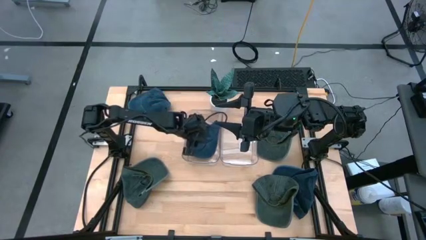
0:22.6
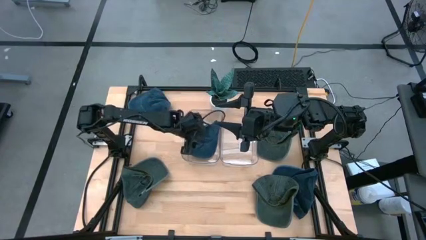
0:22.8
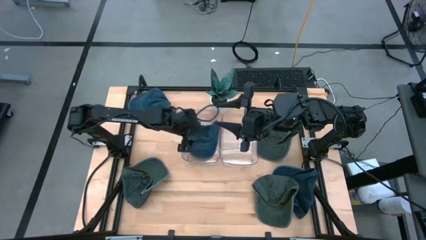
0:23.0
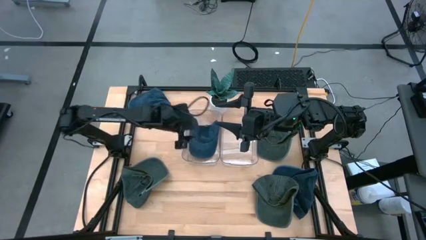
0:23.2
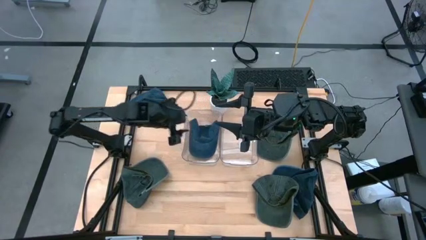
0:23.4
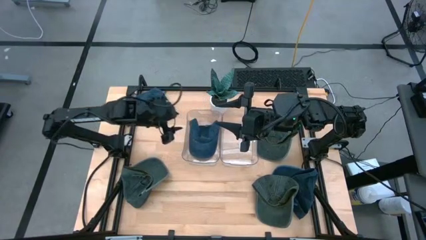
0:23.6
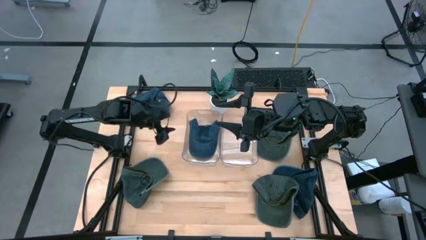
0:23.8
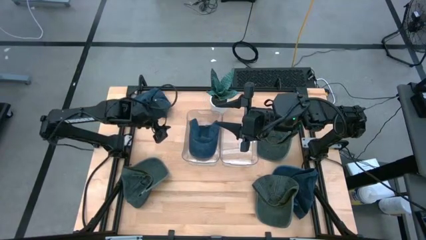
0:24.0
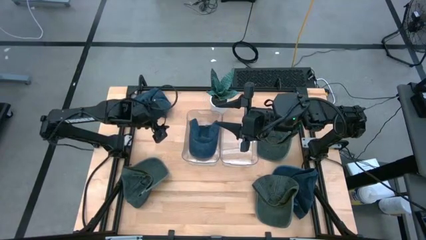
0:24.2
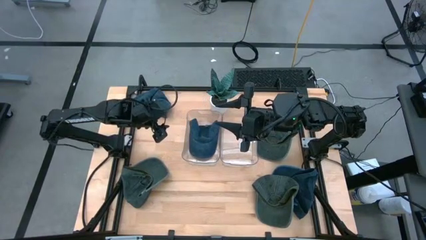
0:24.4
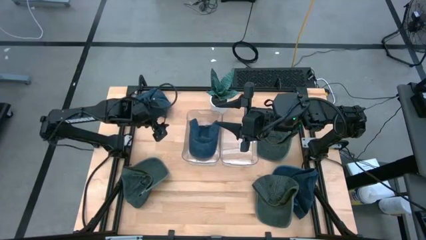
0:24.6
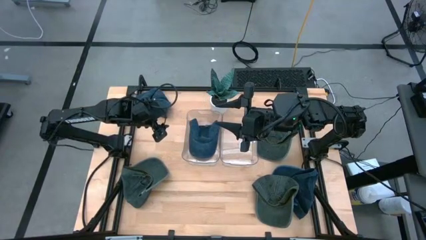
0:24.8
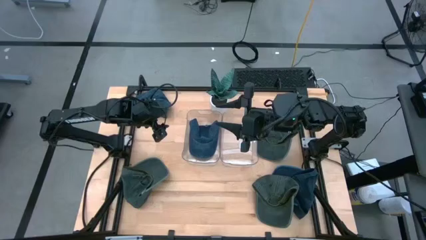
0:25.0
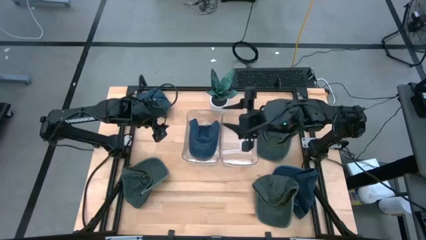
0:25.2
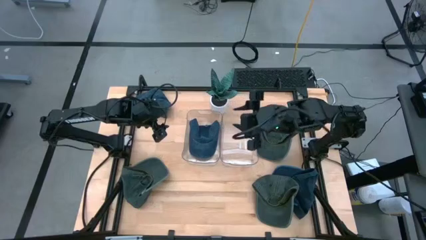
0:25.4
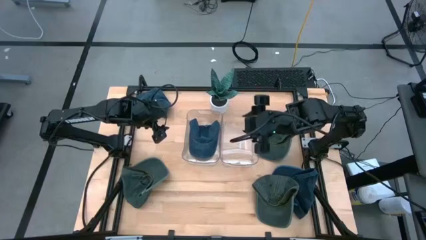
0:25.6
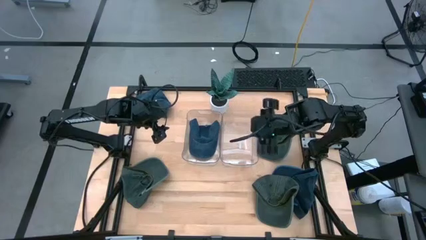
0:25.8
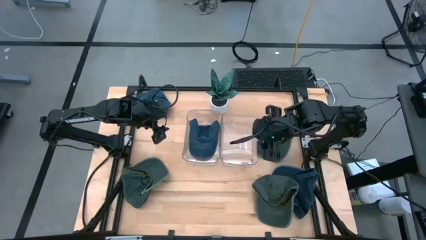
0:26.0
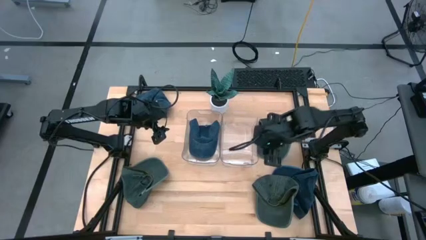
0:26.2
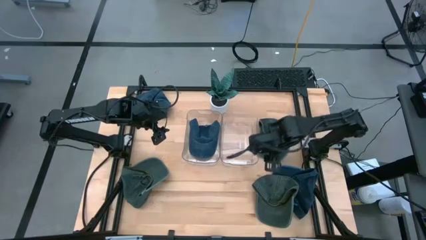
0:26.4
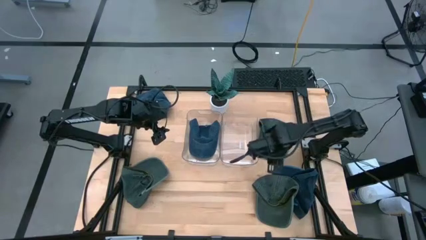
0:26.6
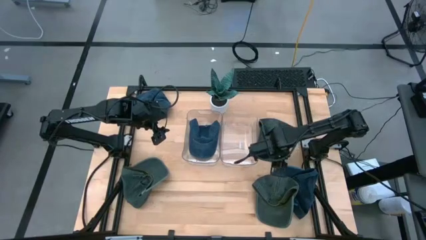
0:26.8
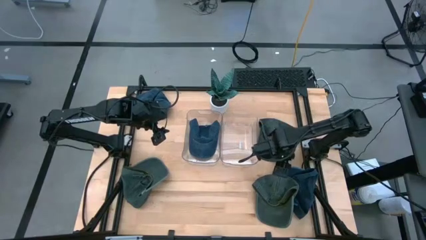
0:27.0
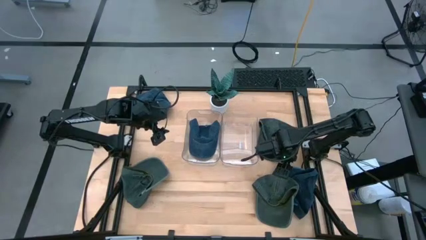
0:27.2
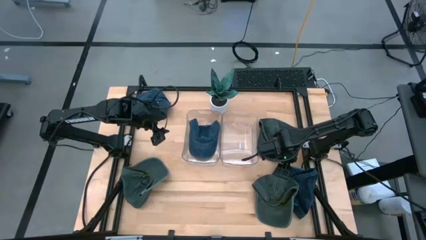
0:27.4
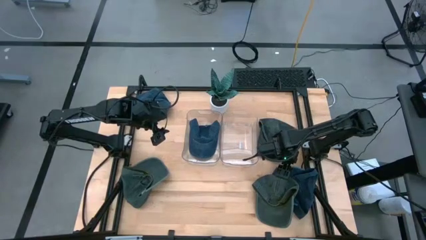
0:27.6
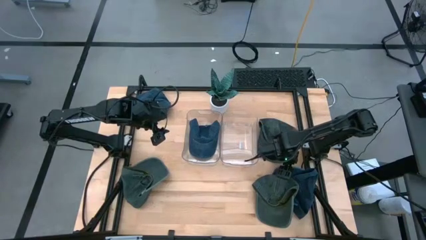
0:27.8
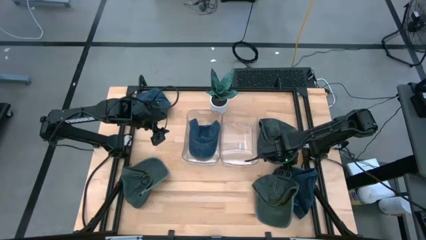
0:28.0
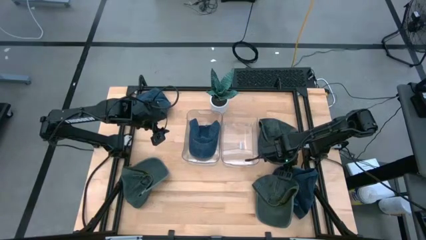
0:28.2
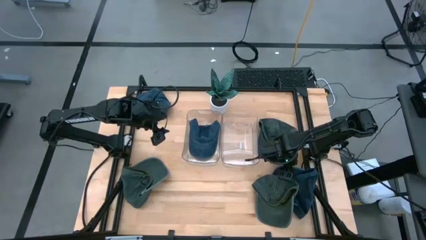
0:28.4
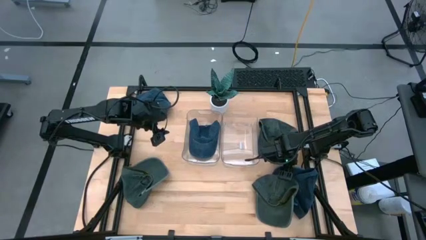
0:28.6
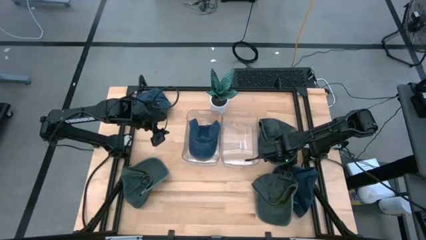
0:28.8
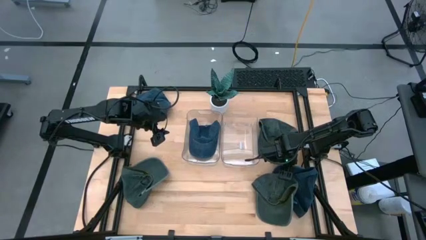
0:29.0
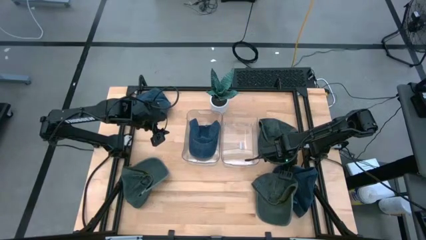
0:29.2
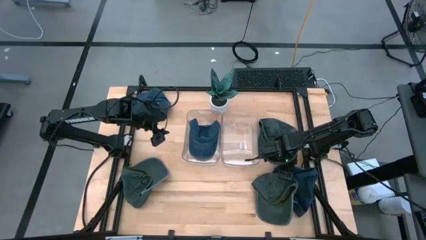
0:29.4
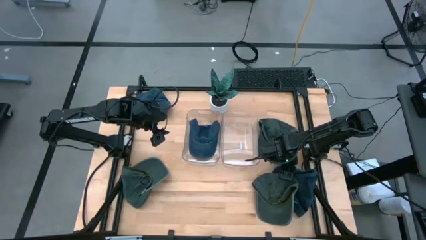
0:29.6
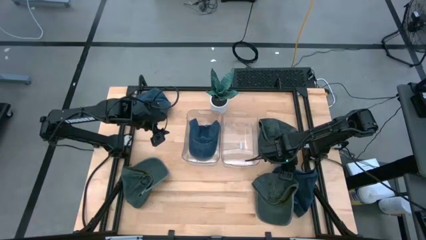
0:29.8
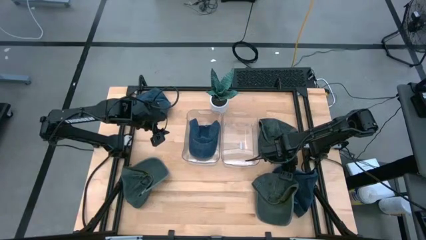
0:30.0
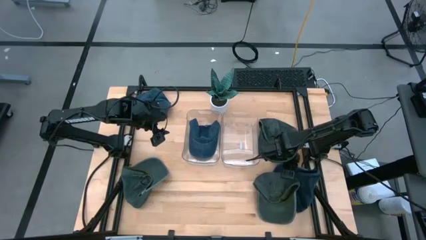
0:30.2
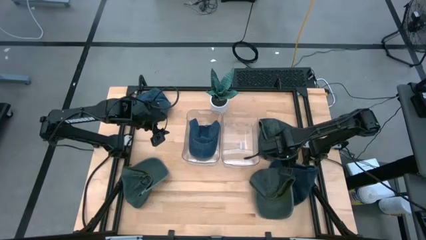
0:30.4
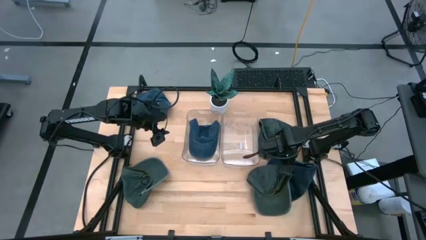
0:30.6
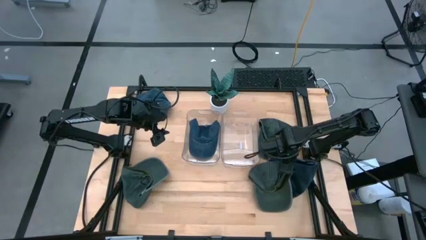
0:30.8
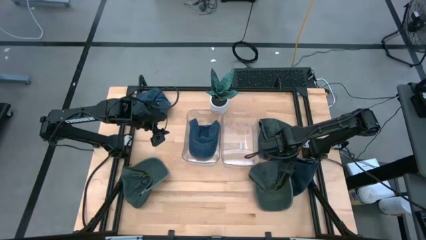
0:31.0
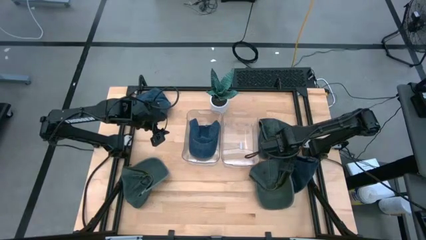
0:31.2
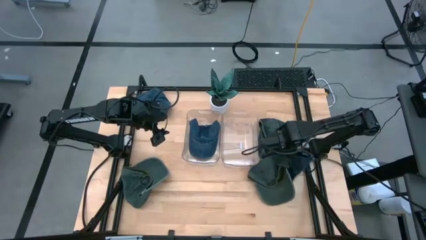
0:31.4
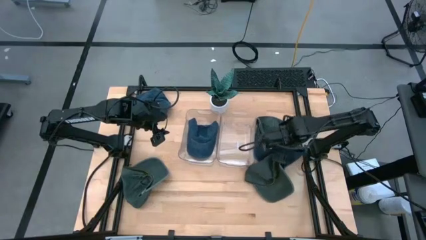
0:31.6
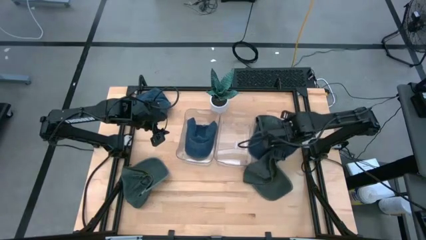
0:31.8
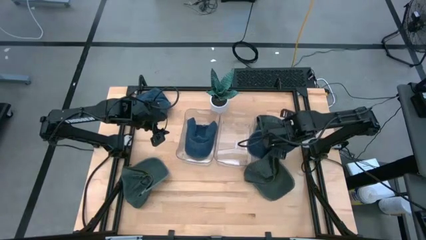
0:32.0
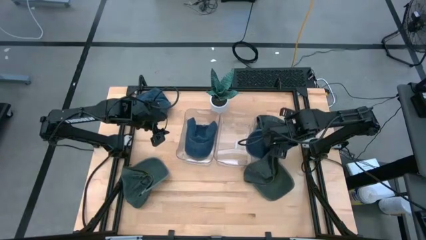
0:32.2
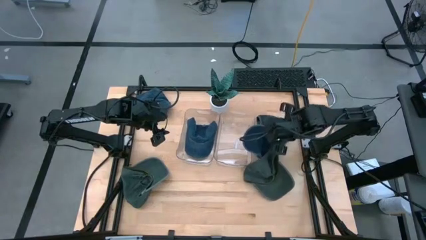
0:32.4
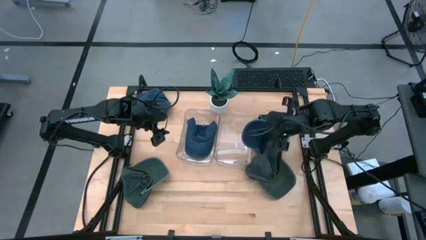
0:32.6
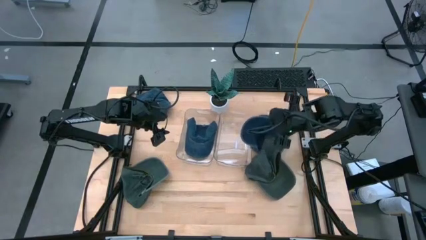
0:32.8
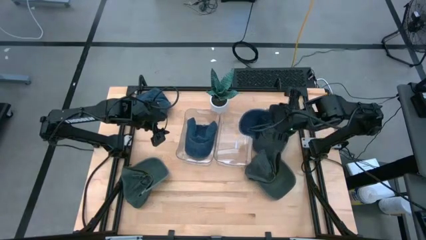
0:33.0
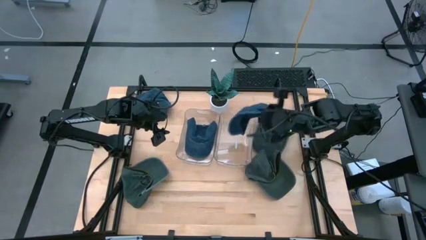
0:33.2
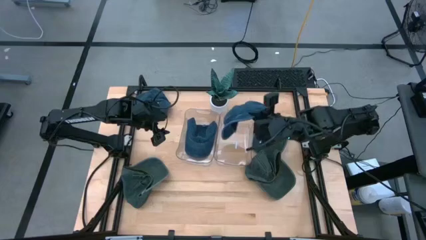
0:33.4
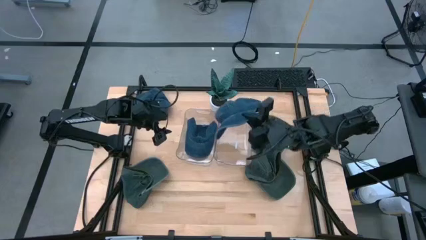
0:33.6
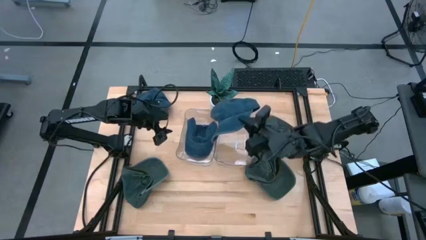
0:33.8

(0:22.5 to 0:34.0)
Task: Pick & Place hat
Put the bottom blue cap into the left transparent bin
